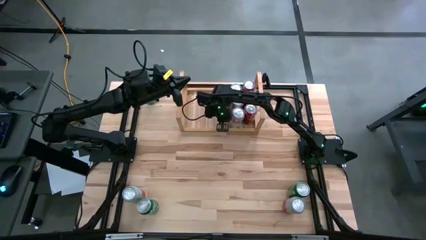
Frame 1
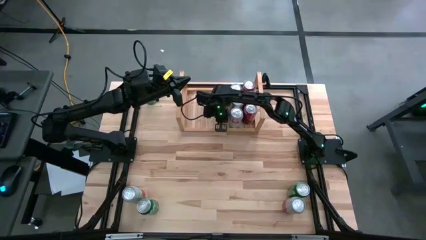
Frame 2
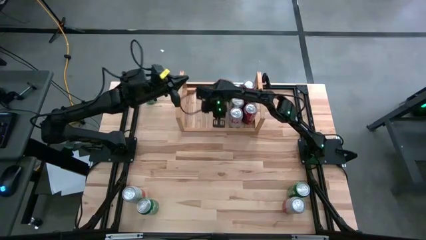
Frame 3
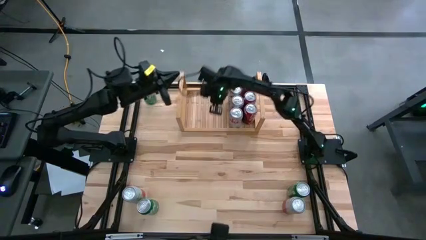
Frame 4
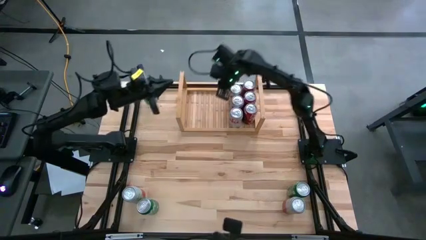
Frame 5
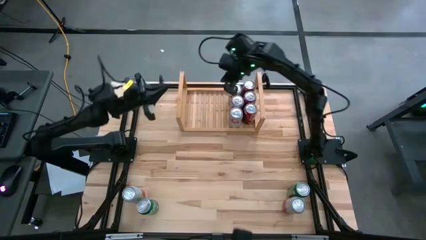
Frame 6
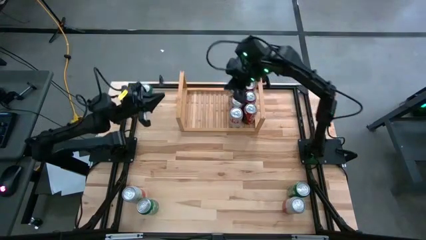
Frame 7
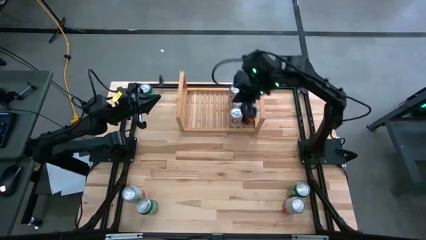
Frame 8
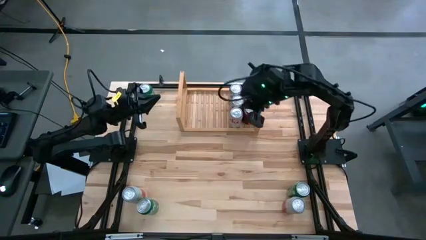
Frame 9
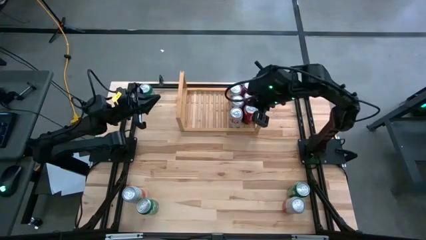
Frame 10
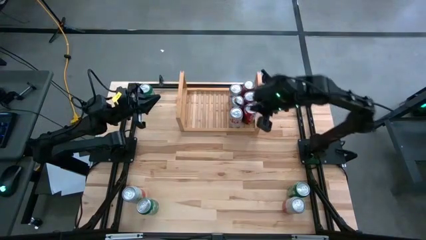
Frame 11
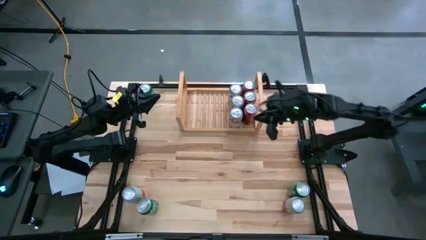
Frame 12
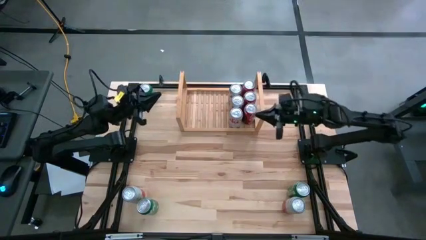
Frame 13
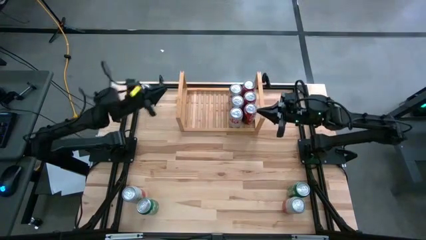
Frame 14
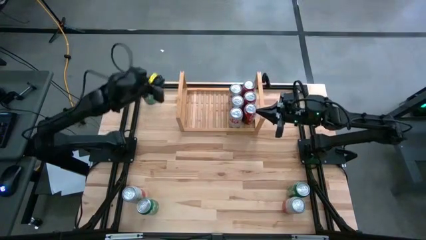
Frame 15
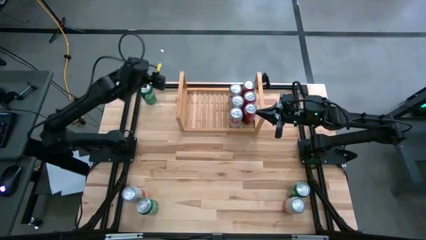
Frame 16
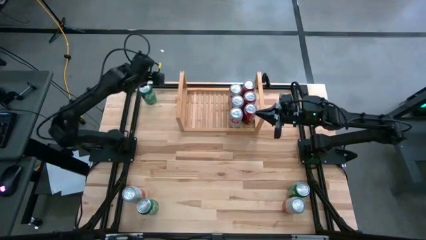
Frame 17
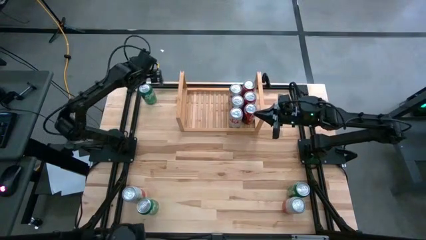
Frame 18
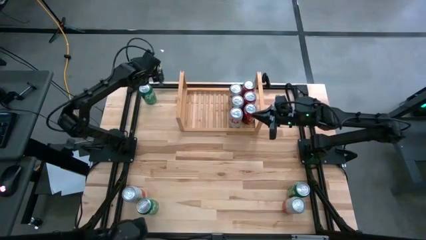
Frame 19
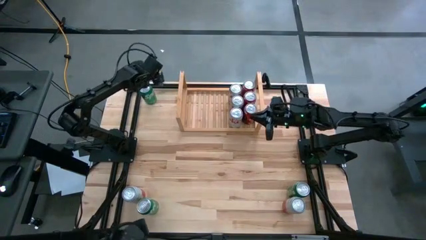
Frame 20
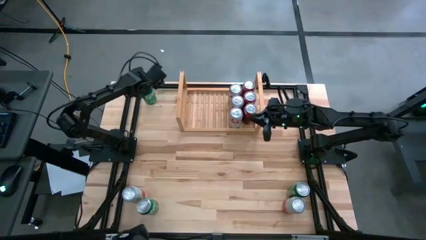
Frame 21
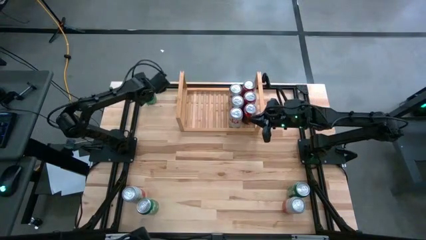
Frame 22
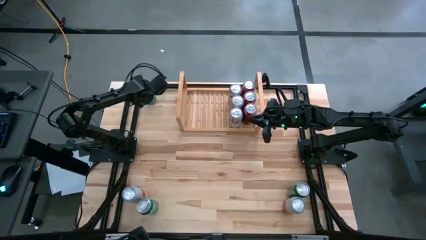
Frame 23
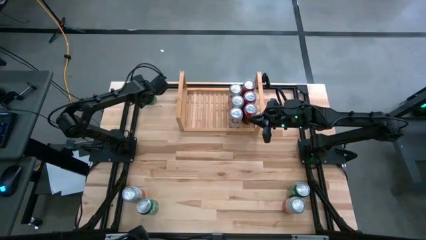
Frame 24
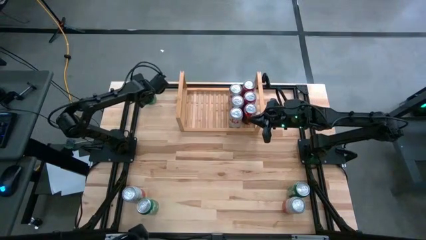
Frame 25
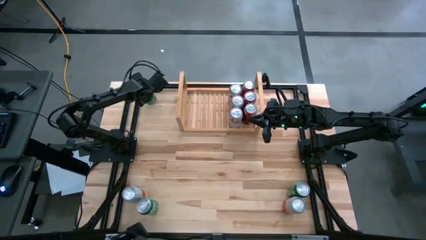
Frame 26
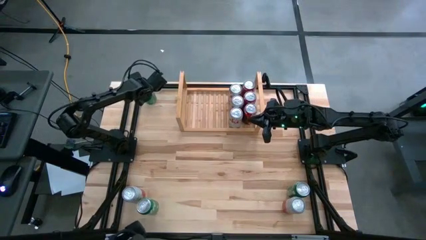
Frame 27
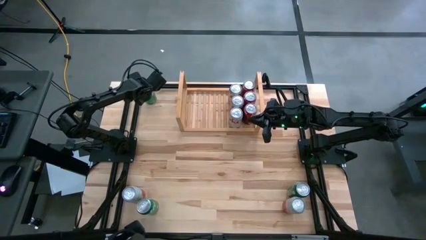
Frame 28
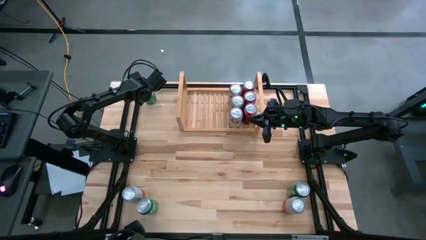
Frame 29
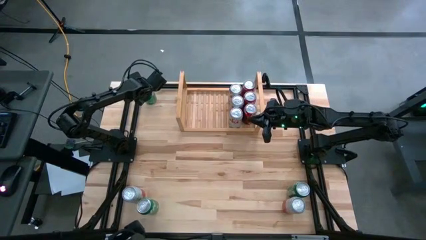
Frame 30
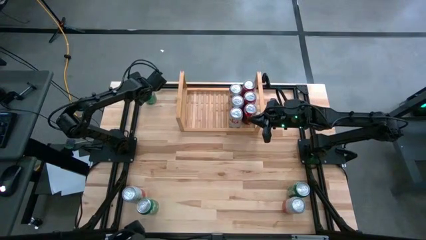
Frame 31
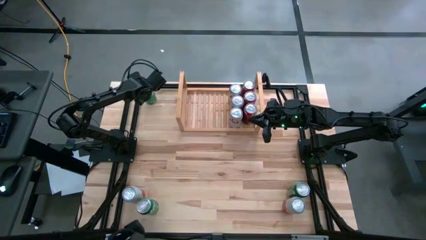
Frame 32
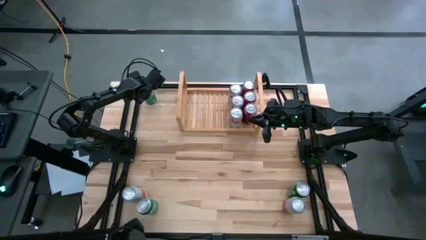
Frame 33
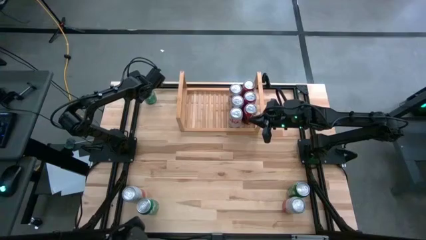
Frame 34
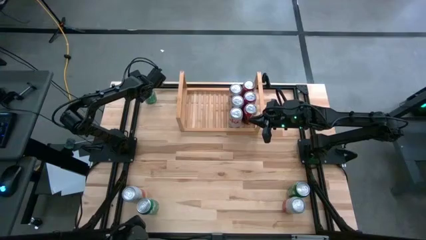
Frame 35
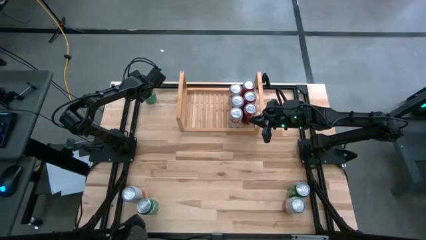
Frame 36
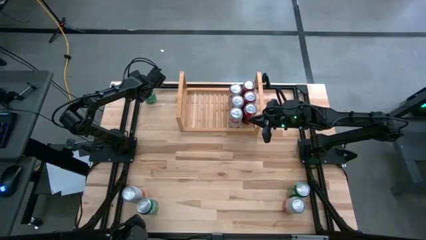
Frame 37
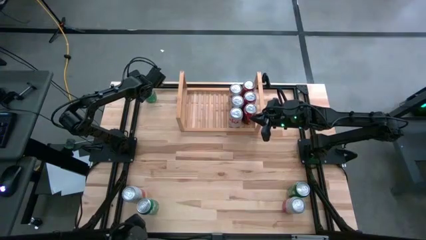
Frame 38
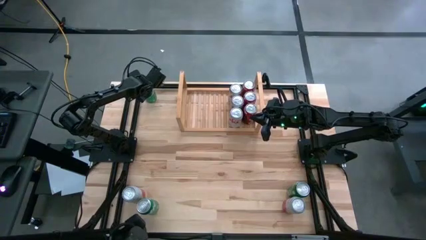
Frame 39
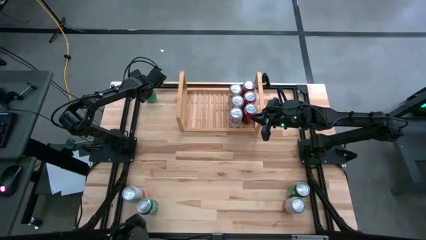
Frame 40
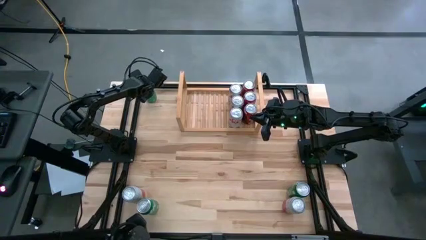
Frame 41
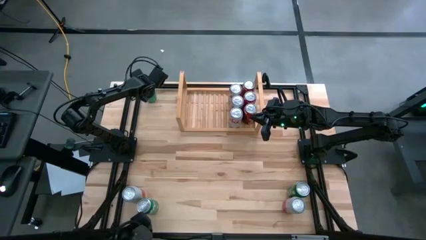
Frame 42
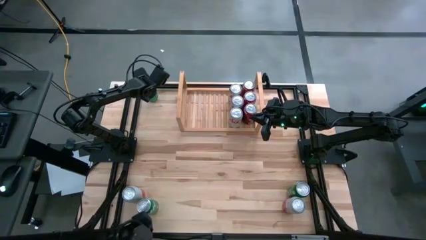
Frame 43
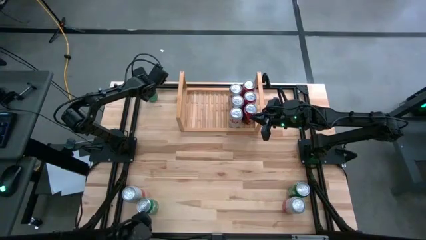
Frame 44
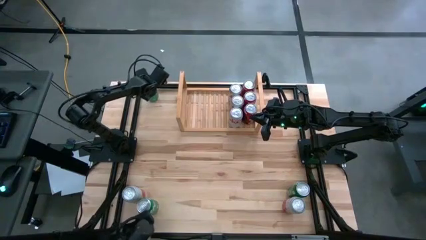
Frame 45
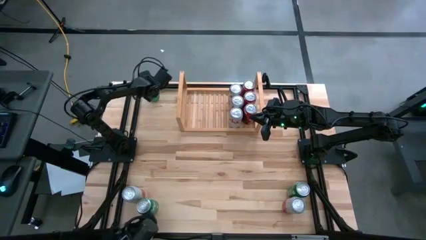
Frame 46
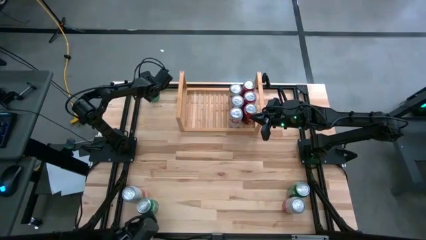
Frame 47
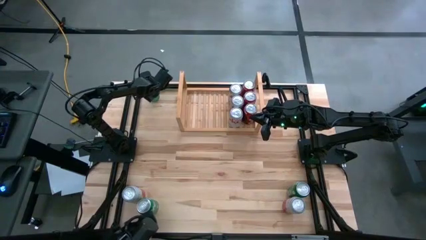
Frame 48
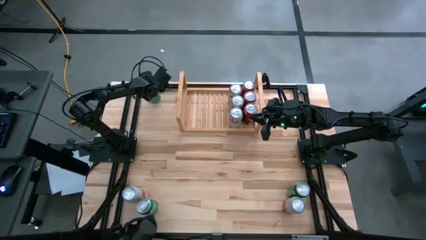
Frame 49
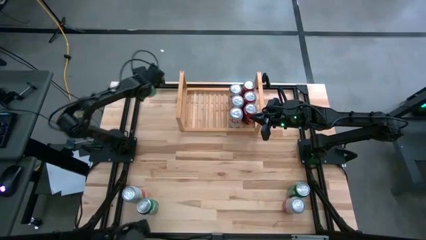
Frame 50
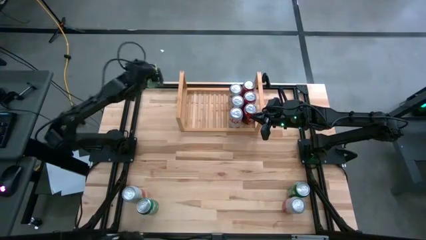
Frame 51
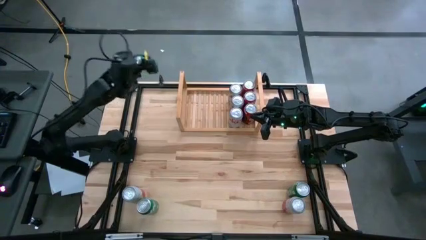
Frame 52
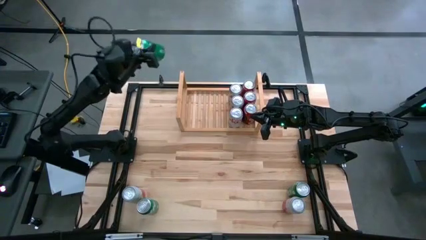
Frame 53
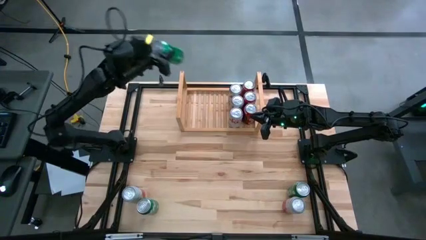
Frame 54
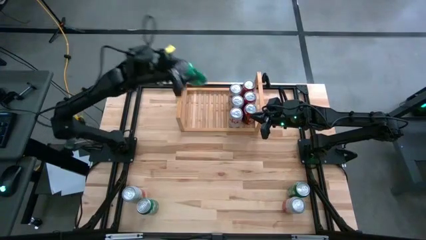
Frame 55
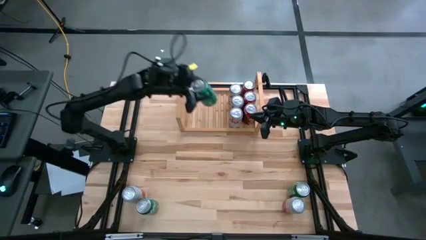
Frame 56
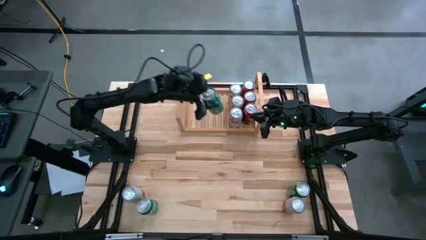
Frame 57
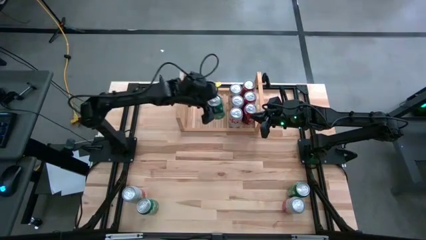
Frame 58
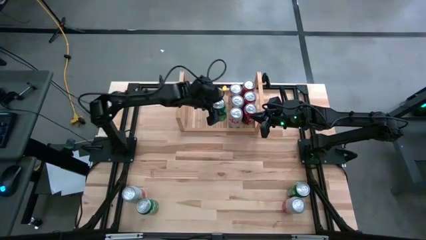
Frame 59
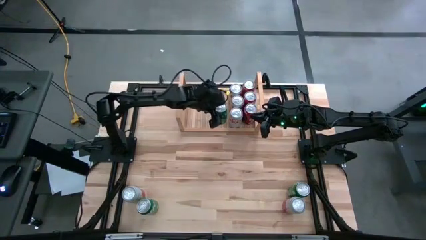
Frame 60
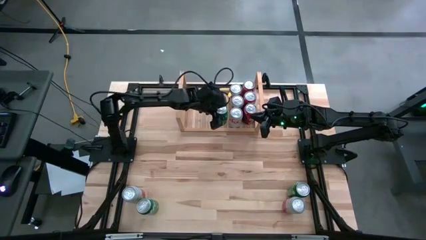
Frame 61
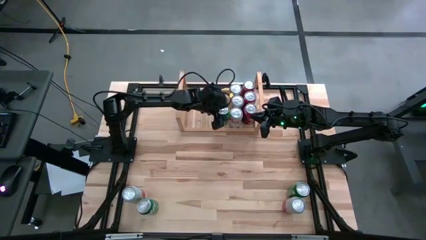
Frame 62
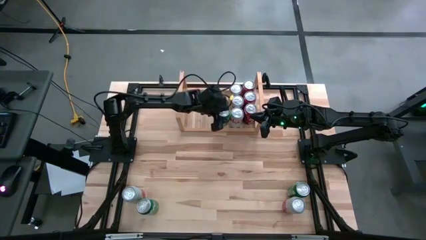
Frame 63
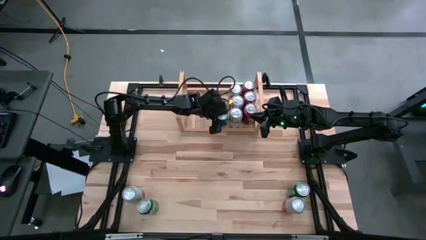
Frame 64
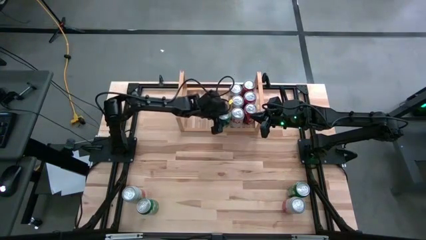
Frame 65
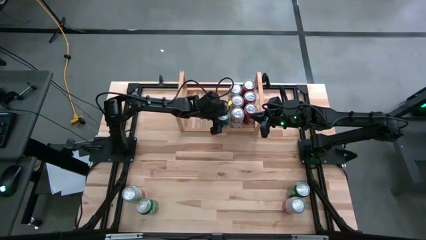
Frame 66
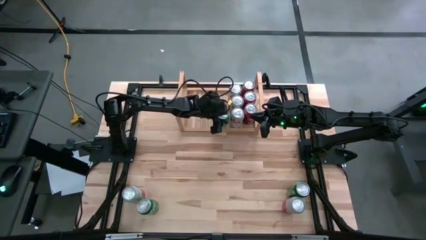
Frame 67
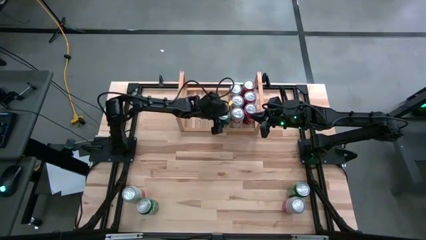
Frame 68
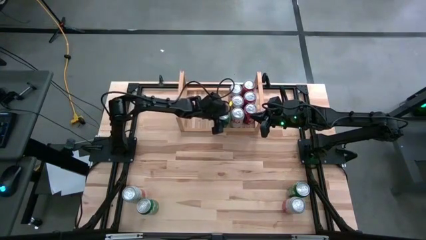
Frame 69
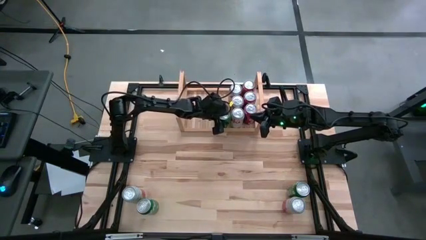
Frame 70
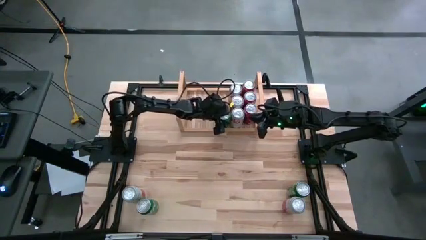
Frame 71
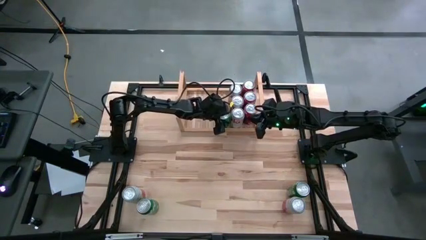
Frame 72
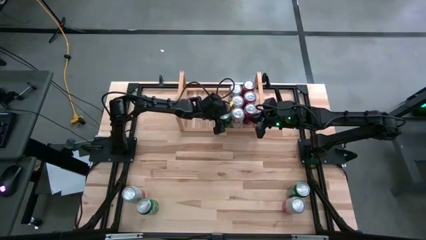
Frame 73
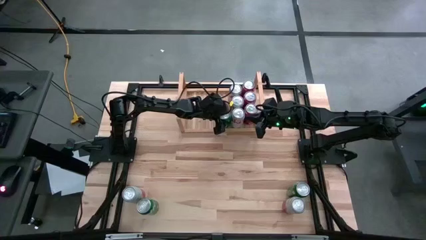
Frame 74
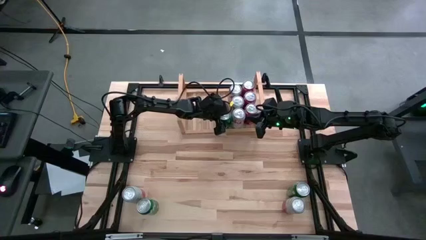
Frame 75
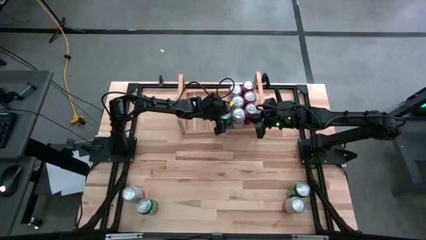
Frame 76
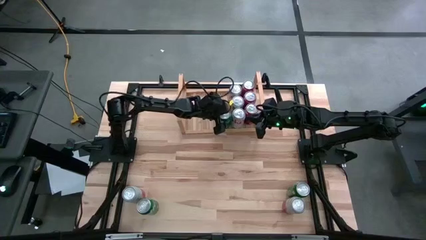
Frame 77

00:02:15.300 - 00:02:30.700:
Task: Place canned beverage on shelf
Put the top right green soda can on the shelf
